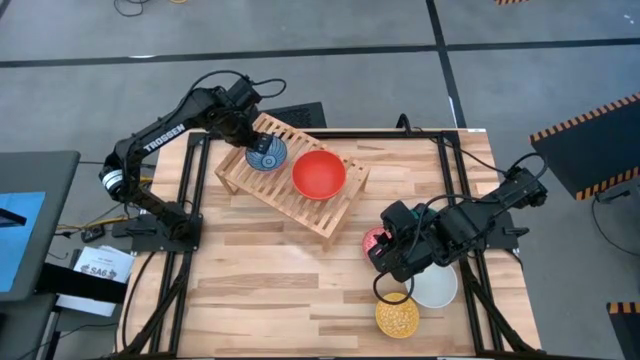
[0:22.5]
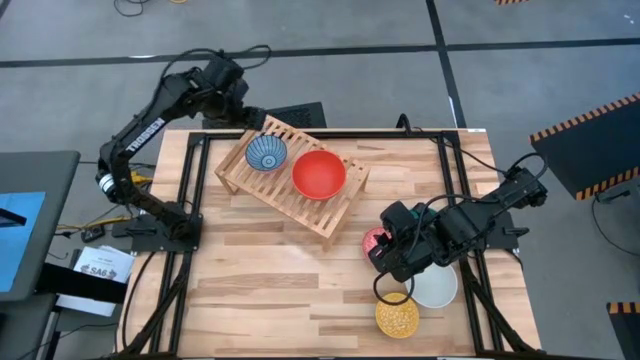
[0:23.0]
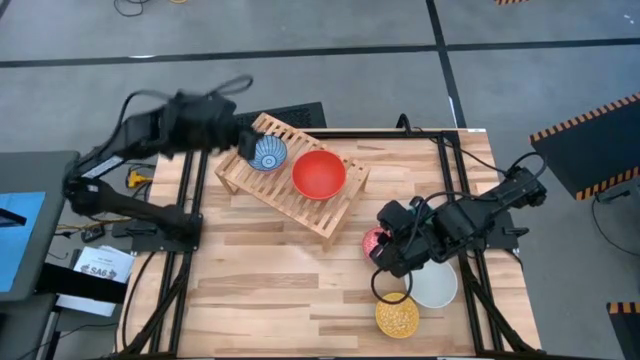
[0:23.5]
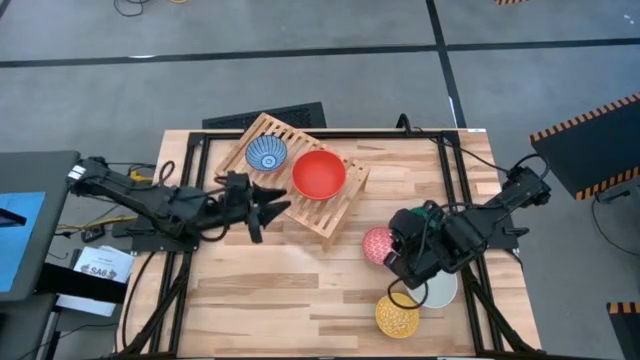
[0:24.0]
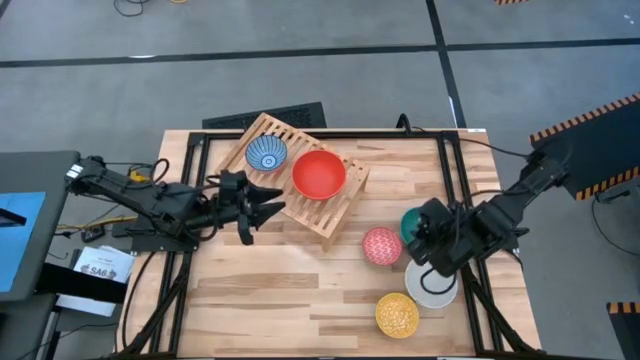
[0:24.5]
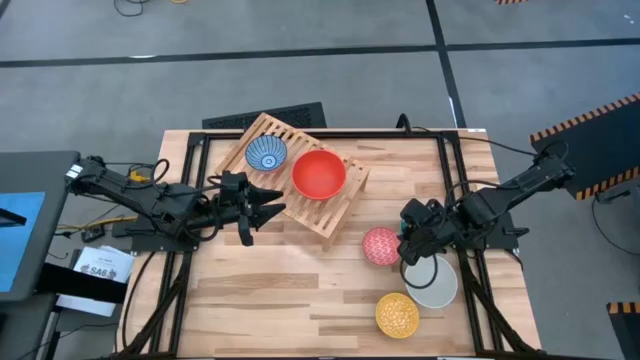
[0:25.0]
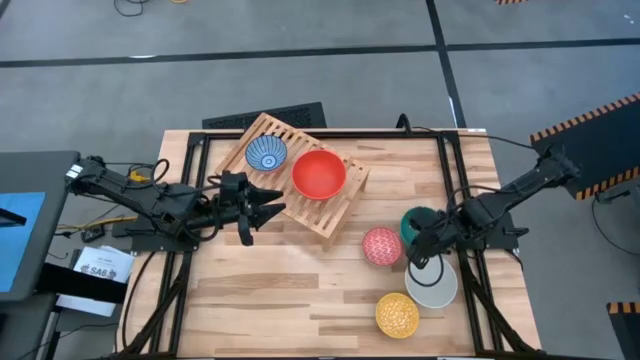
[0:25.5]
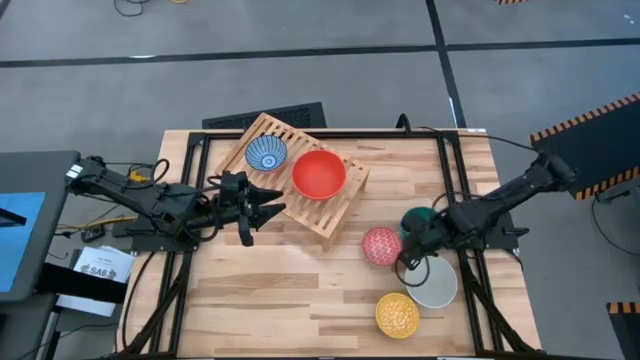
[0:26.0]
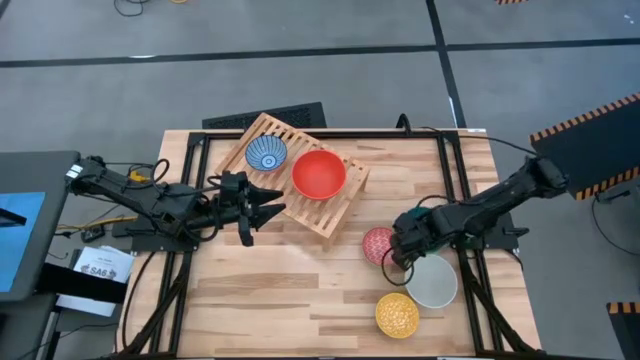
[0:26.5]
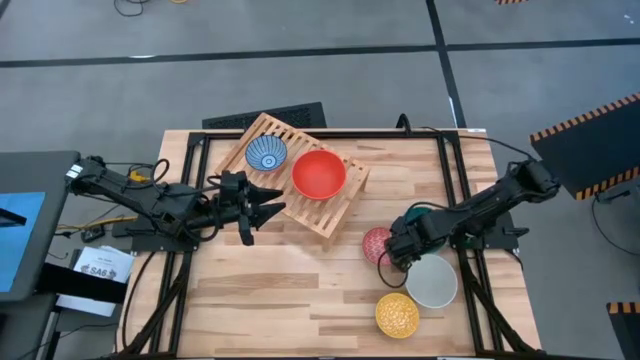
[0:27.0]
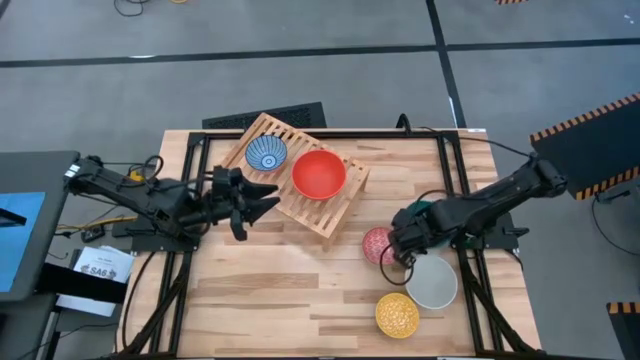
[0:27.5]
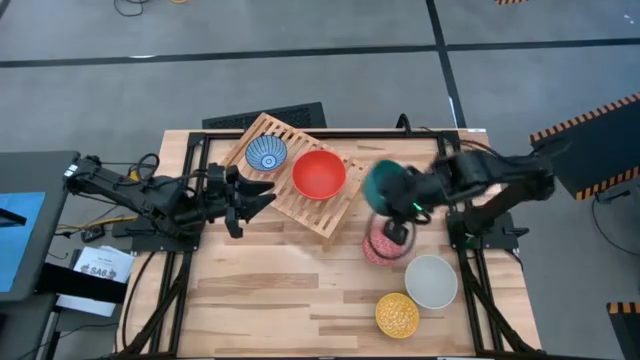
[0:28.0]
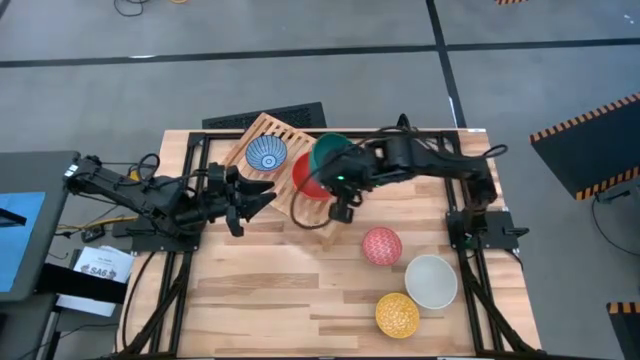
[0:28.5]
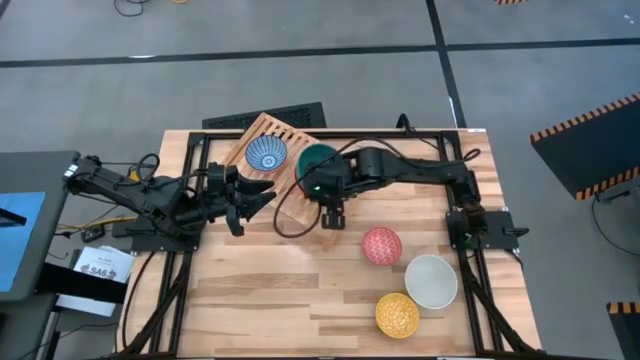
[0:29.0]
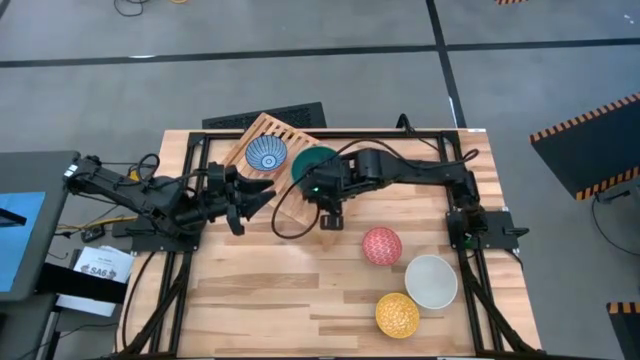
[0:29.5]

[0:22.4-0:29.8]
Task: Place and stack bowls onto a shelf
Stack the green bowl on the top of orange bowl on the shelf

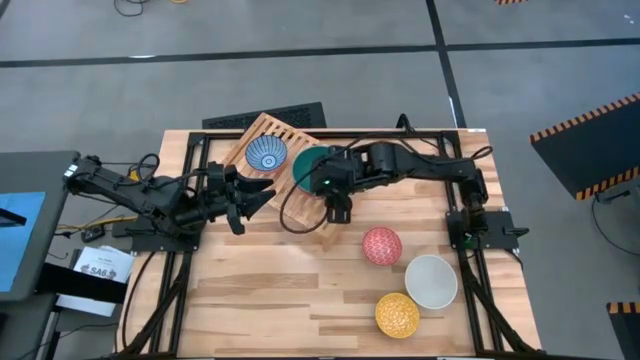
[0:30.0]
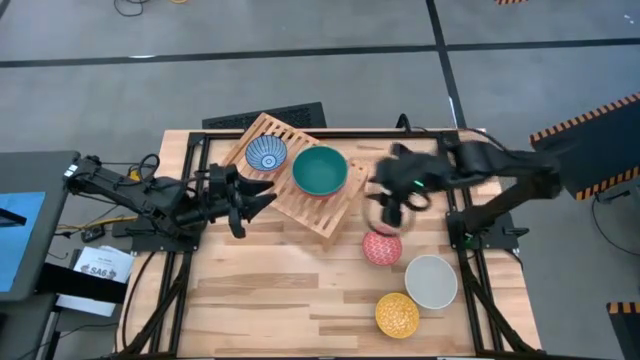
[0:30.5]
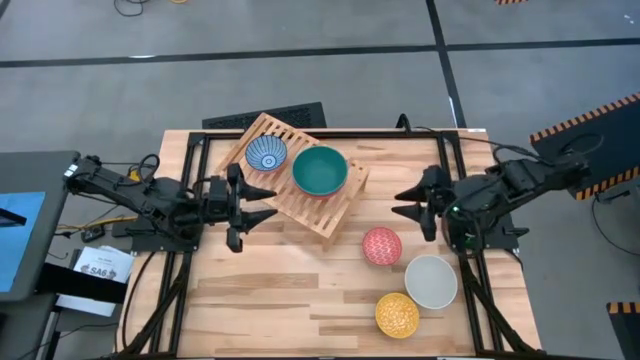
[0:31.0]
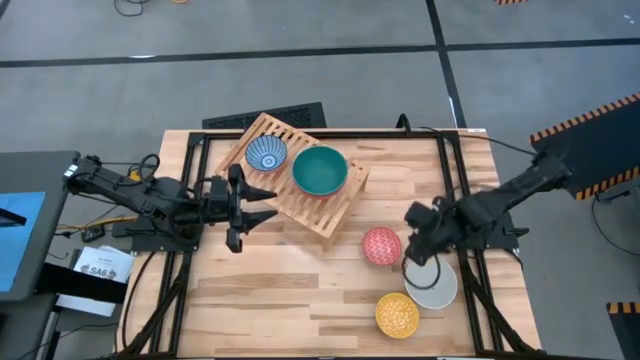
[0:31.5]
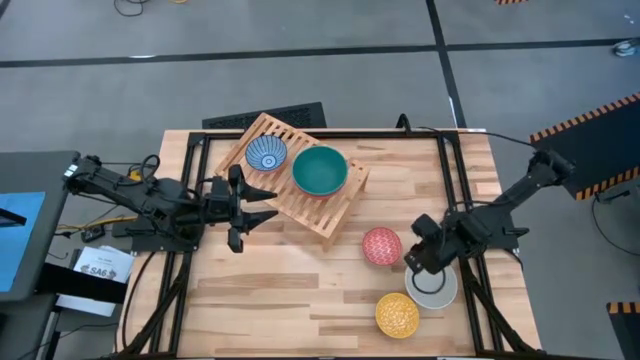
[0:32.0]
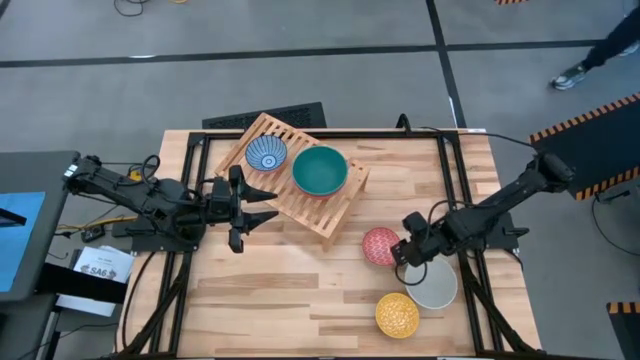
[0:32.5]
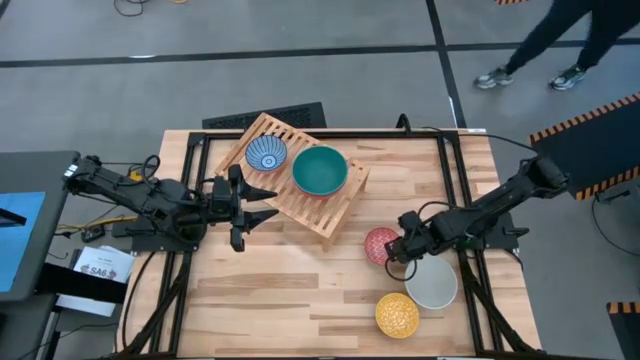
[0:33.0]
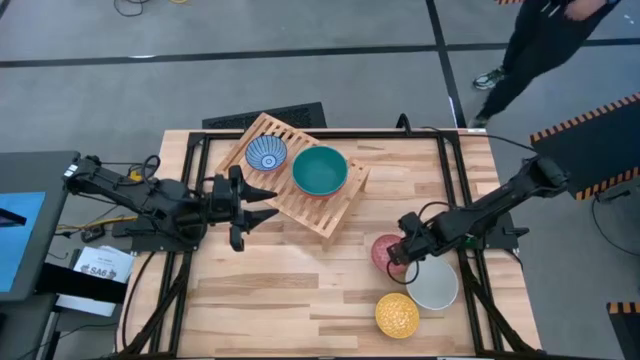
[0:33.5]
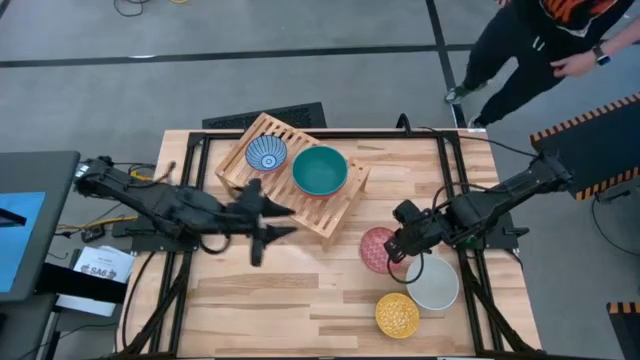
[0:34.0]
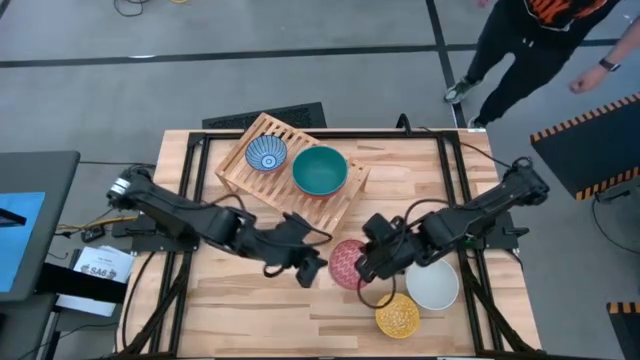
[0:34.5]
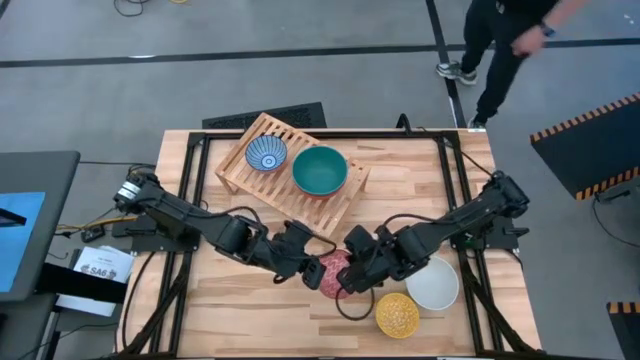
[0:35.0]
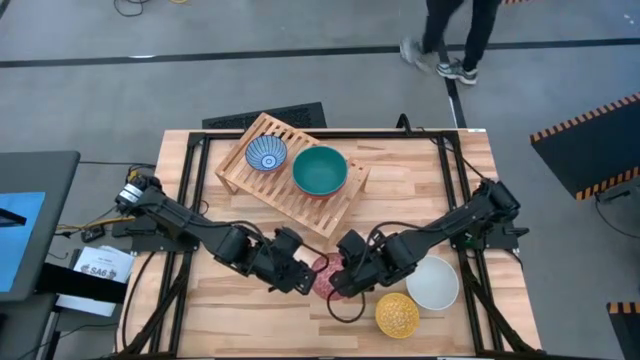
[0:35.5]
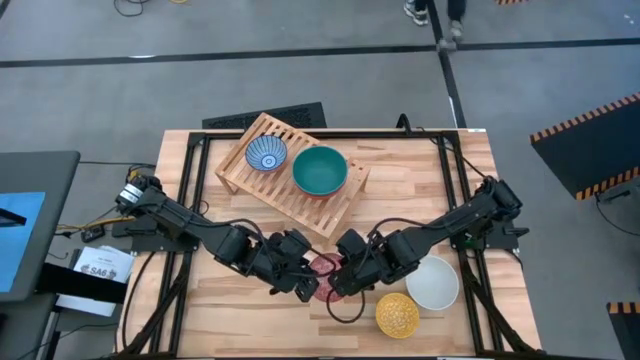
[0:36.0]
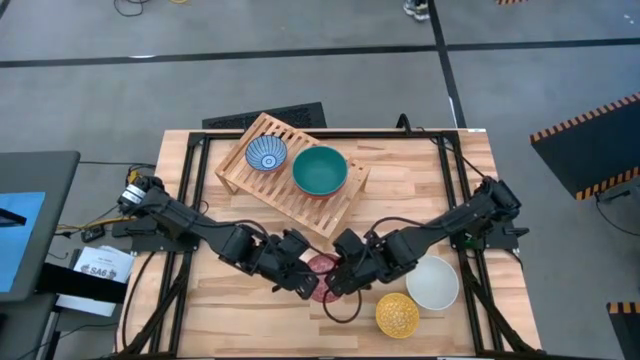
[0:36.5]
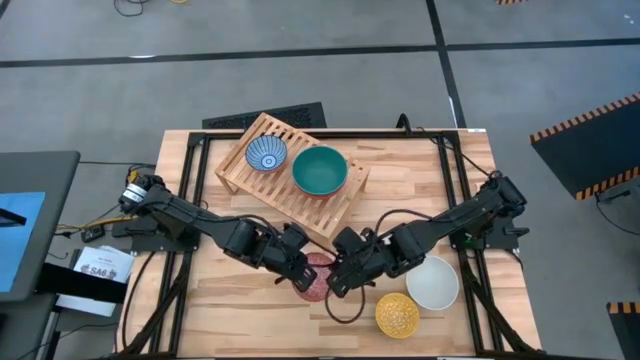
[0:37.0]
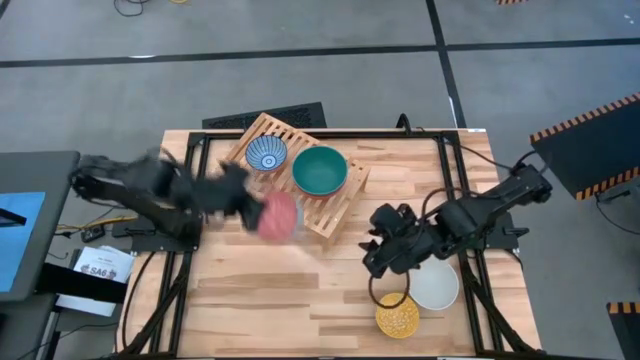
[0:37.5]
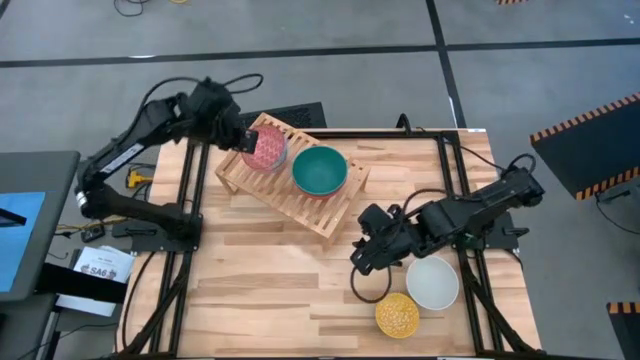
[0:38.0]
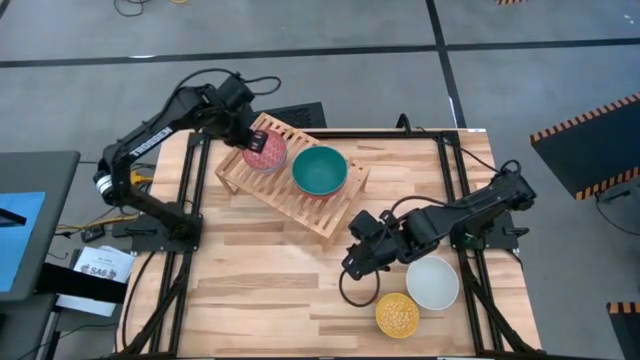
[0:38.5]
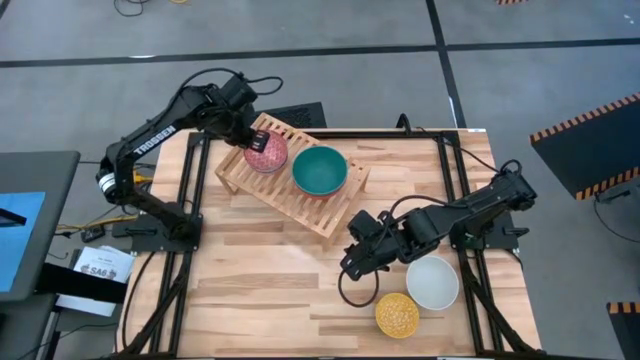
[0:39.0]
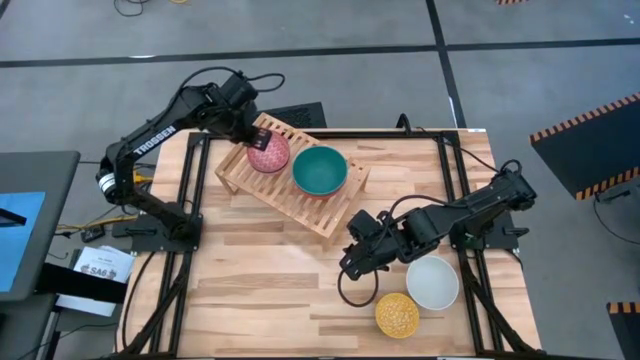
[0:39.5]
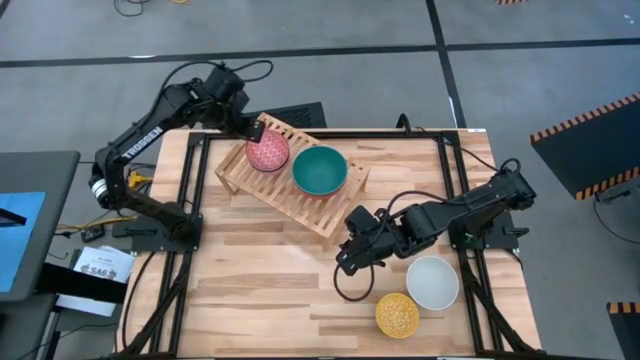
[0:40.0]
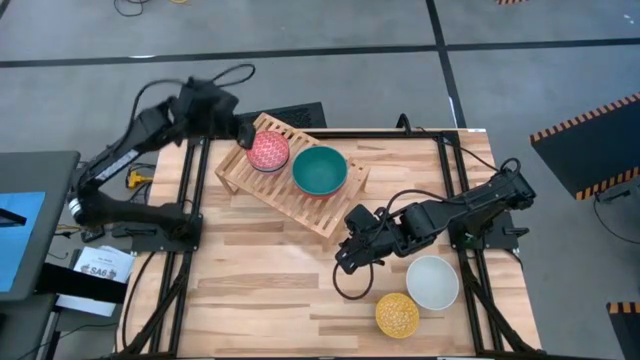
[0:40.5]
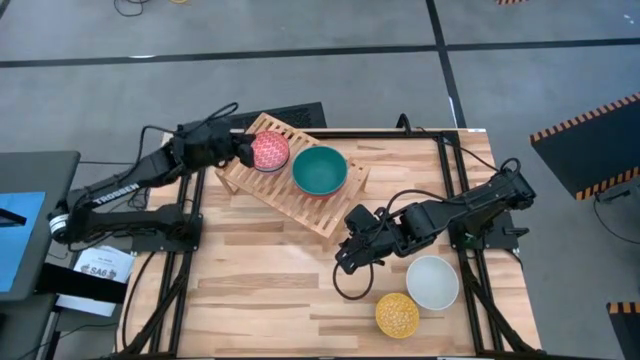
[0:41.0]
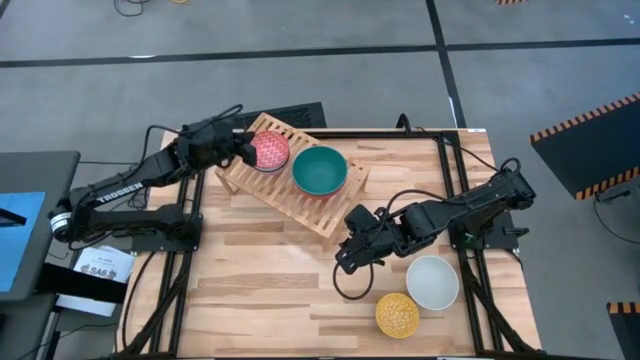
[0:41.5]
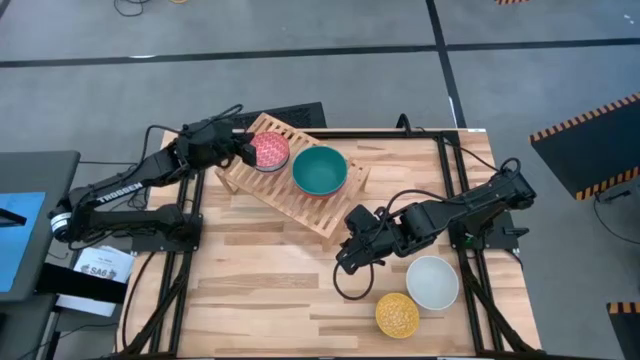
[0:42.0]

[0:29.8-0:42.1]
Stack the red bowl on the top of the blue bowl on the shelf

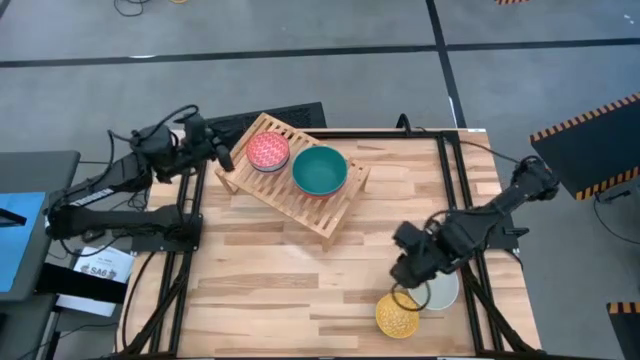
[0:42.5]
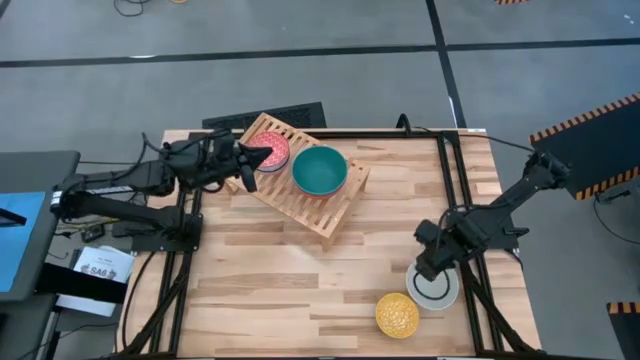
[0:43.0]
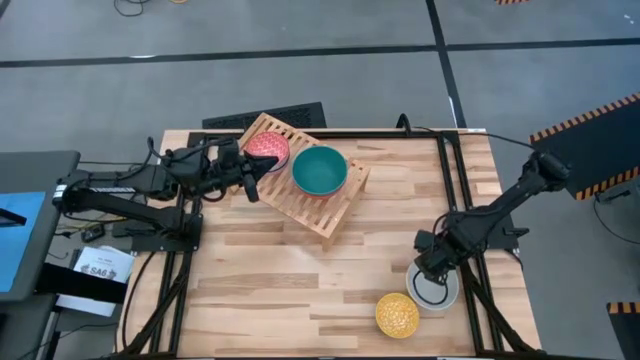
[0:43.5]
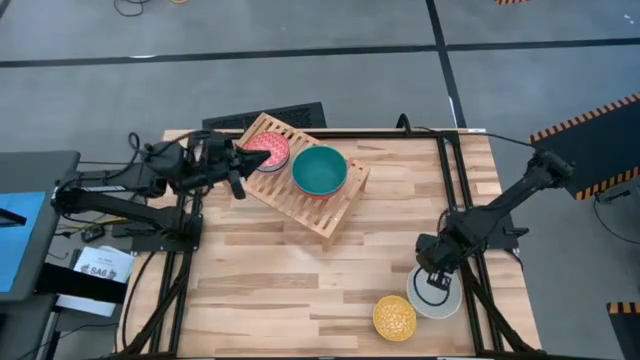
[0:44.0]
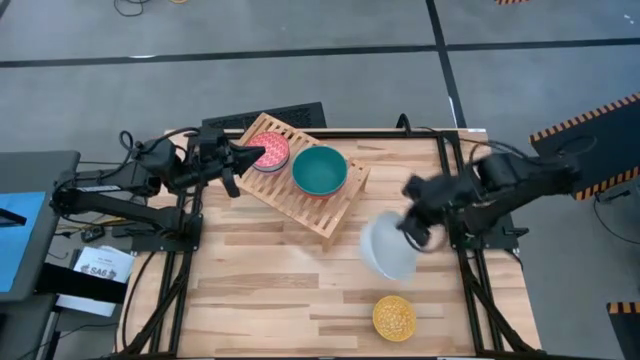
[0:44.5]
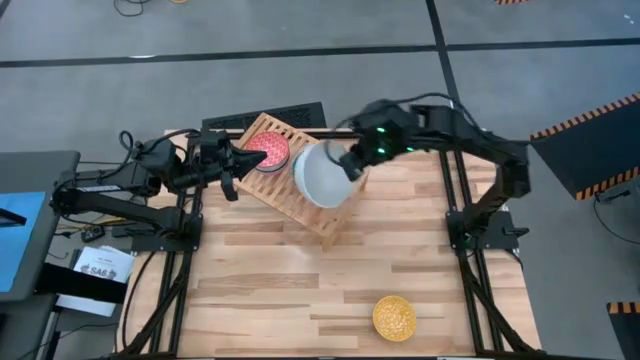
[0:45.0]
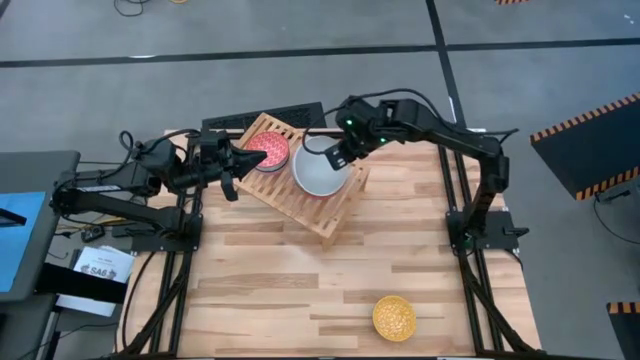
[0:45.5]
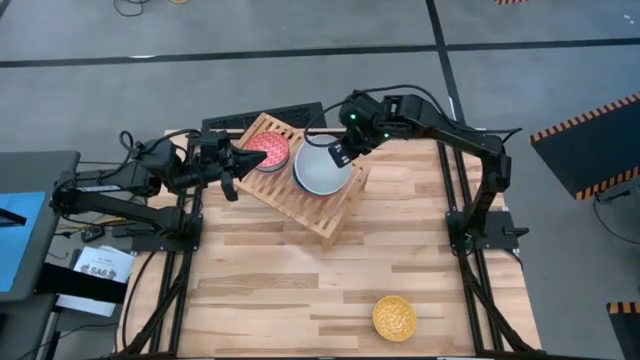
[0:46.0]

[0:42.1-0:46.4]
Stack the white bowl on the top of the green bowl on the shelf
